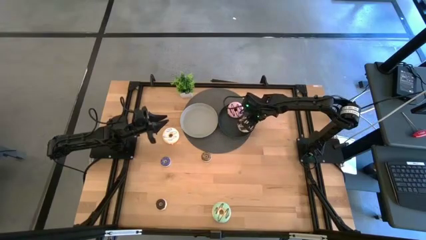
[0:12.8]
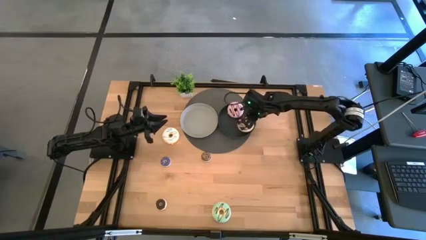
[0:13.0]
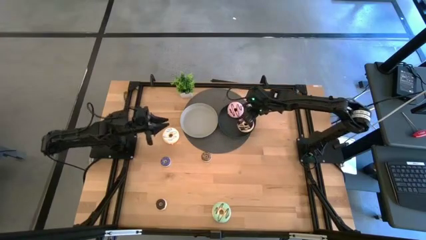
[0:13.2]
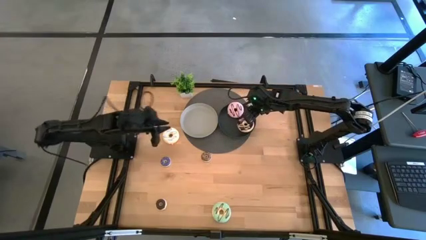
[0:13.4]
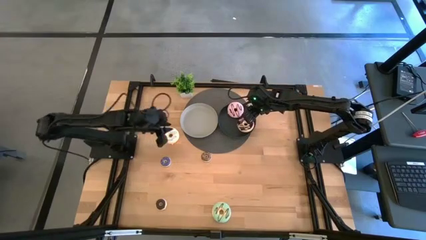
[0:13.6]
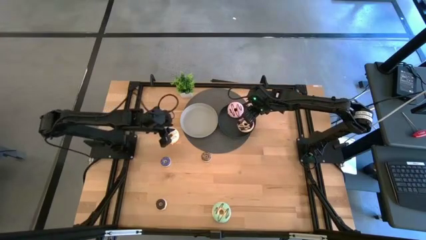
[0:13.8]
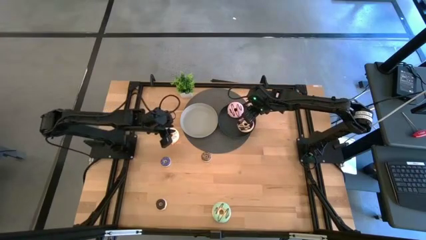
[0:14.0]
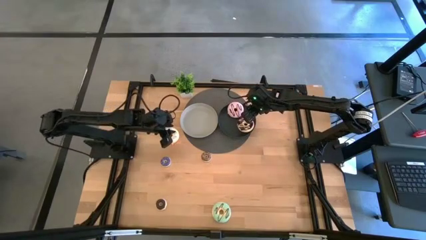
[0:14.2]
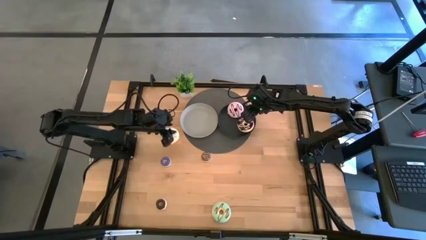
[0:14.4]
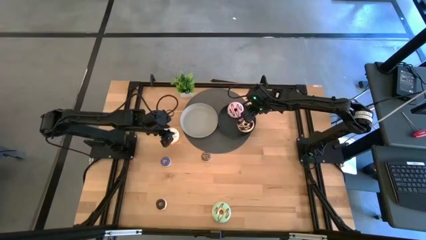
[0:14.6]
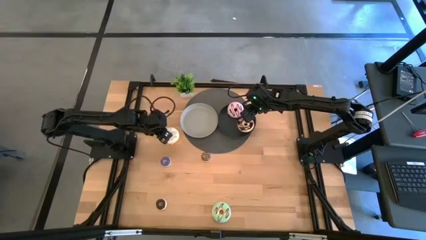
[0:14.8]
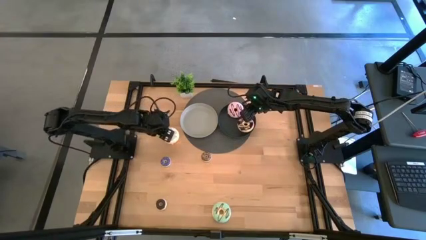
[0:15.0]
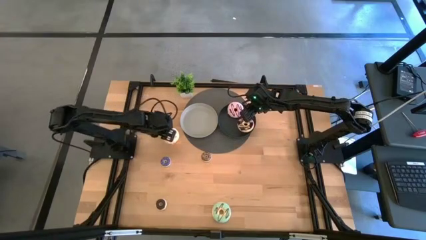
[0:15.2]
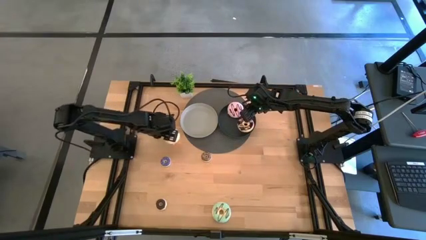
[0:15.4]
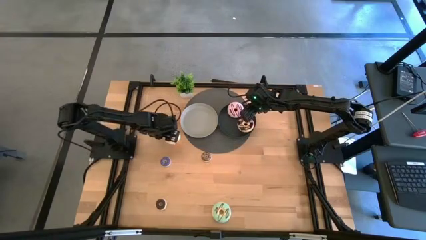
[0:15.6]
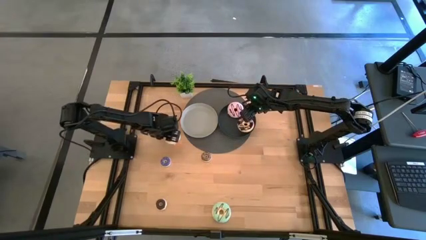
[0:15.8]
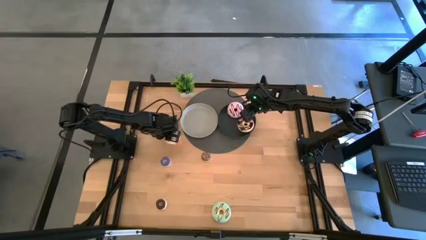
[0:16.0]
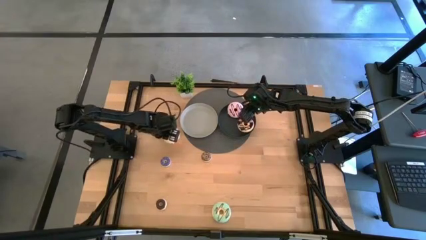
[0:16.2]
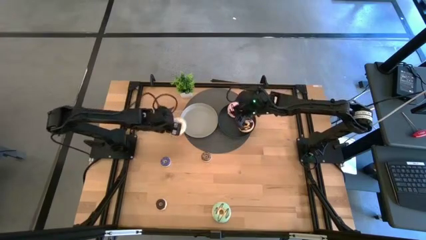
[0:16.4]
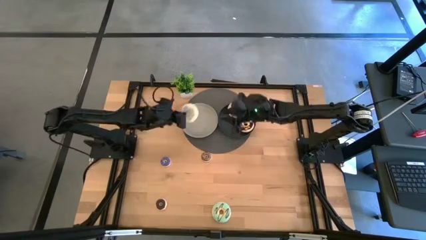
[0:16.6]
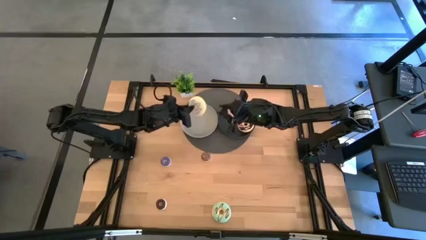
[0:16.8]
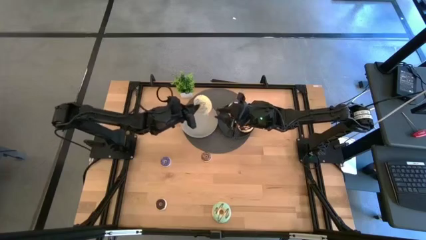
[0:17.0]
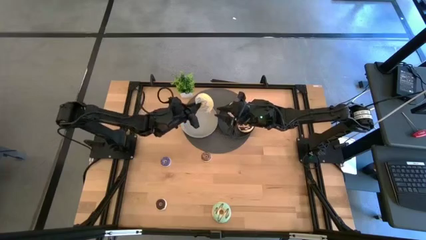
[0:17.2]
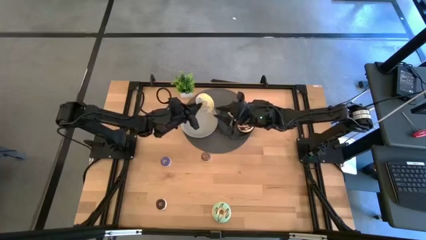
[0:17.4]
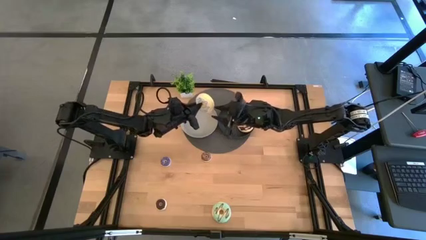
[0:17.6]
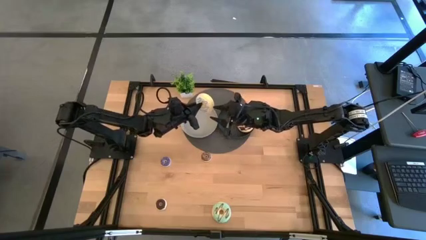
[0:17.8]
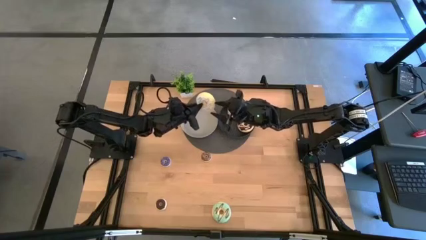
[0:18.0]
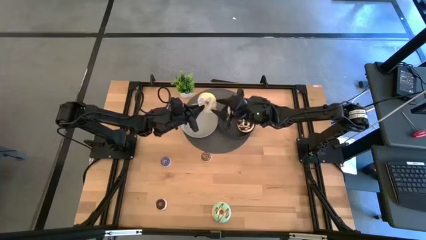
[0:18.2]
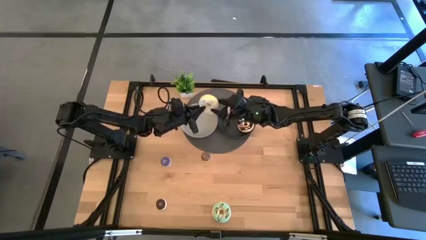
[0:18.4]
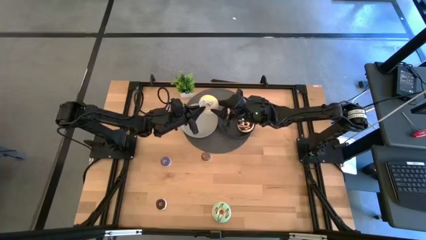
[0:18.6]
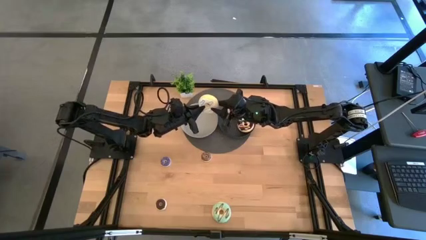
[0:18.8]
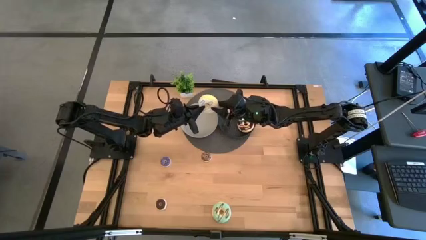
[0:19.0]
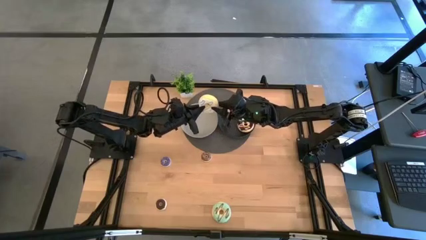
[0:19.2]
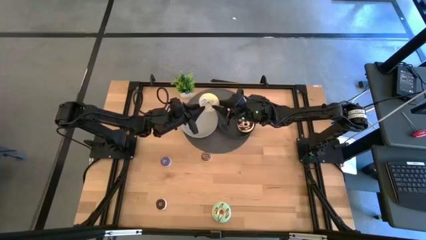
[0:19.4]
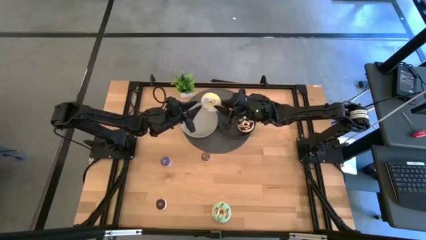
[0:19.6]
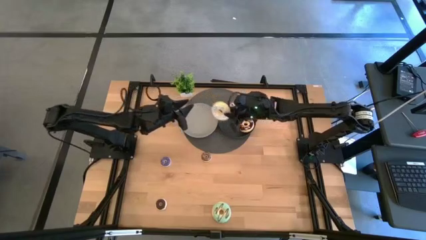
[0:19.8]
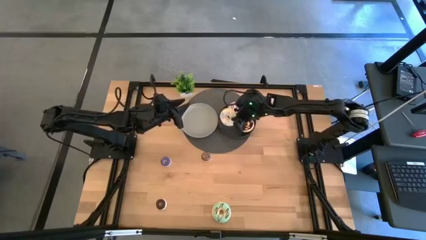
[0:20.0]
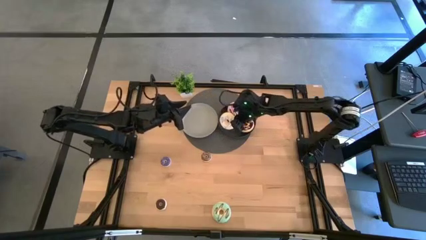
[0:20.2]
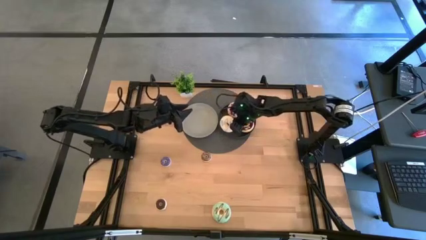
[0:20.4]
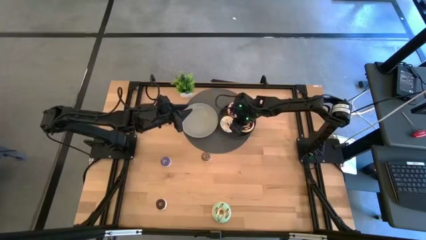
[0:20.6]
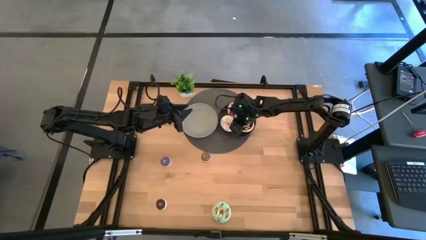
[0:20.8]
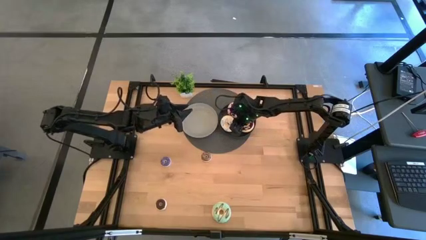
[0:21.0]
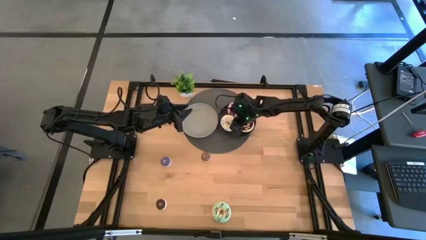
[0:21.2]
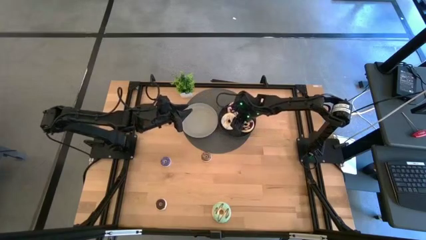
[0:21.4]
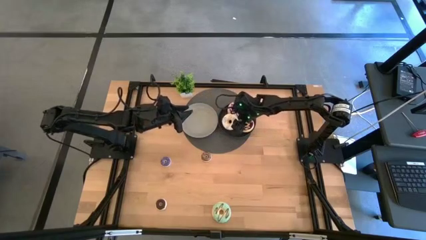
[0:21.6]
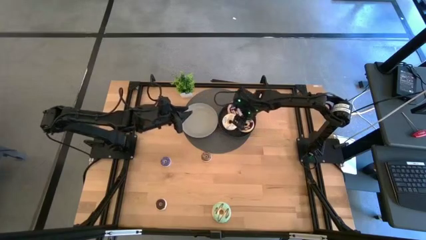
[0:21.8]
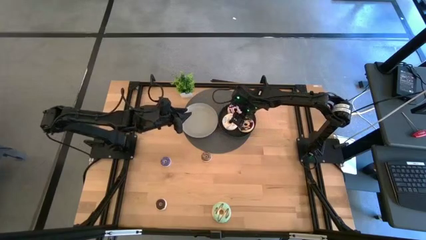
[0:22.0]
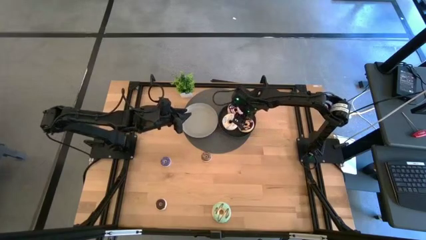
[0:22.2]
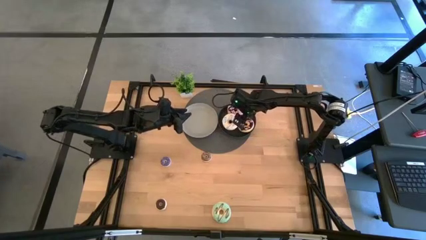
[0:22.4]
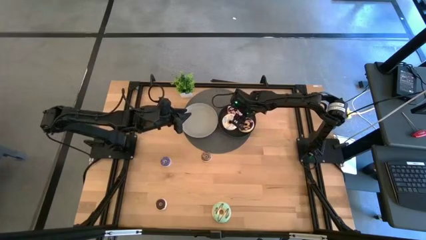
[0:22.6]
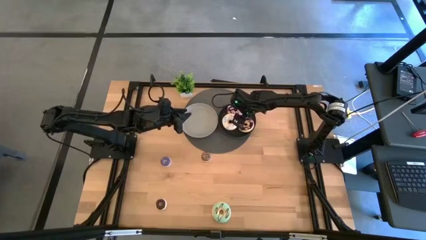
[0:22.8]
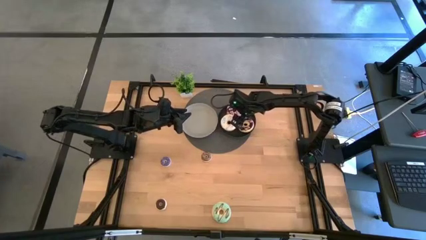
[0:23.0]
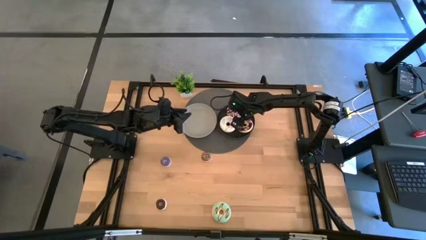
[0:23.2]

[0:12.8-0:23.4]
Task: Pick & Place donuts
Put the big white donut on the black plate

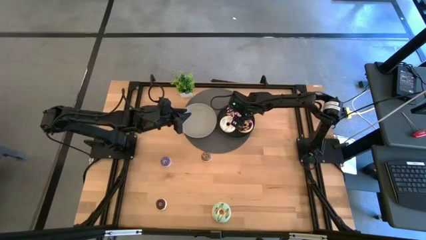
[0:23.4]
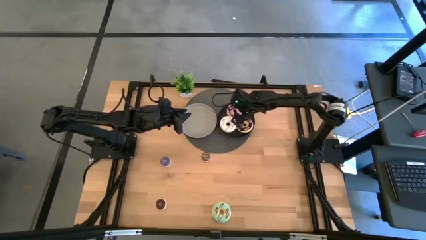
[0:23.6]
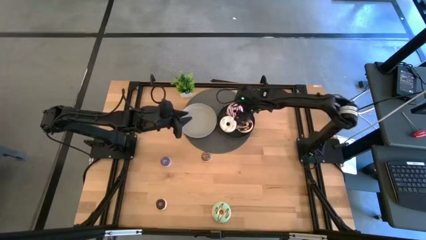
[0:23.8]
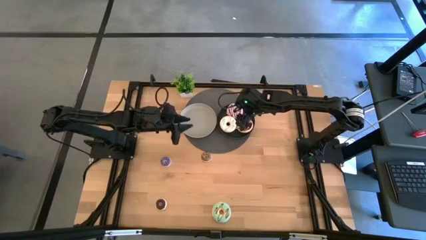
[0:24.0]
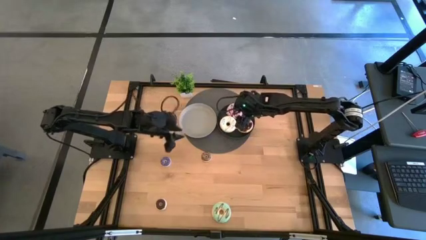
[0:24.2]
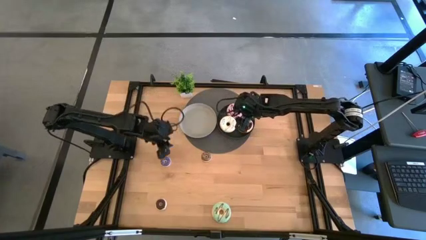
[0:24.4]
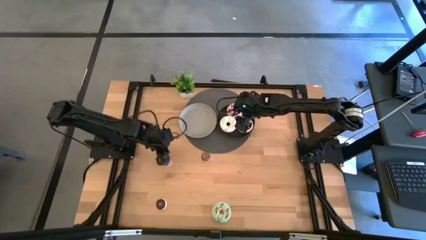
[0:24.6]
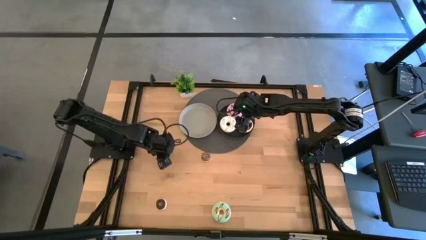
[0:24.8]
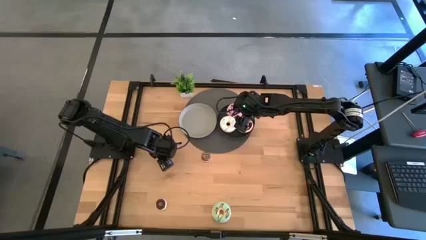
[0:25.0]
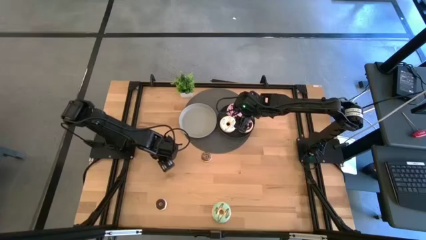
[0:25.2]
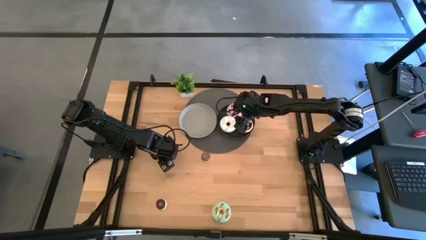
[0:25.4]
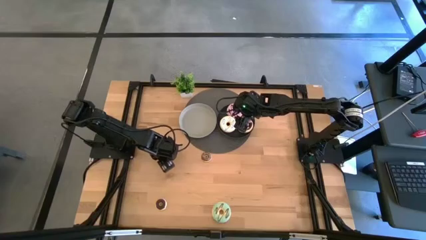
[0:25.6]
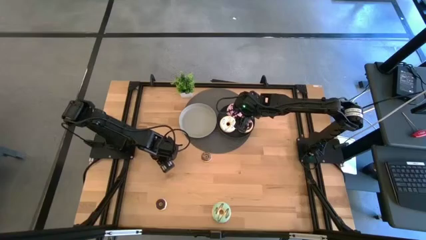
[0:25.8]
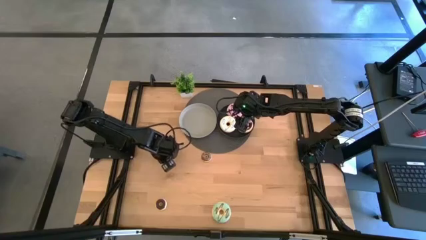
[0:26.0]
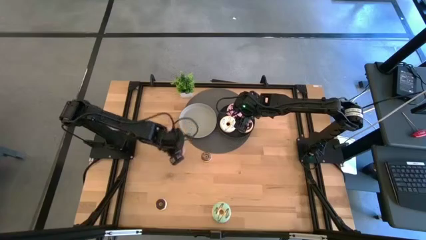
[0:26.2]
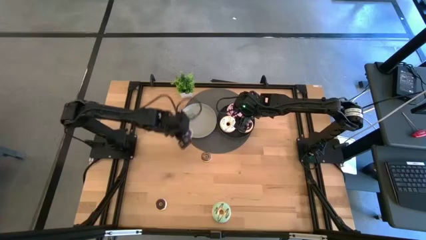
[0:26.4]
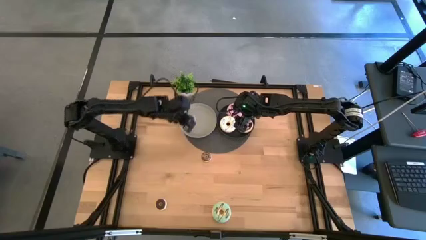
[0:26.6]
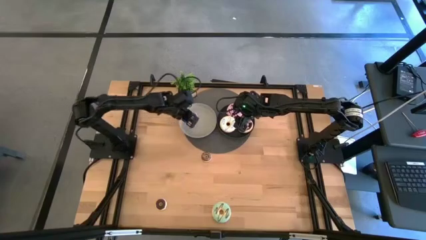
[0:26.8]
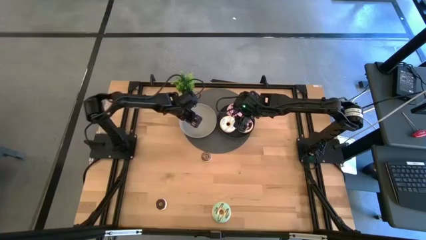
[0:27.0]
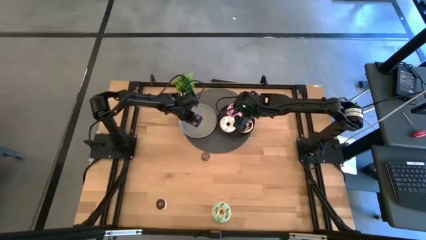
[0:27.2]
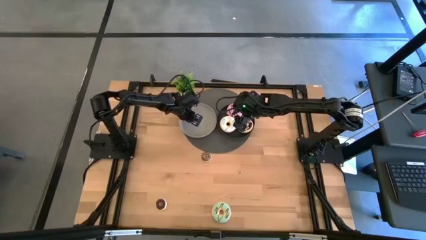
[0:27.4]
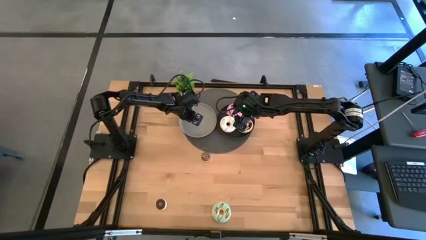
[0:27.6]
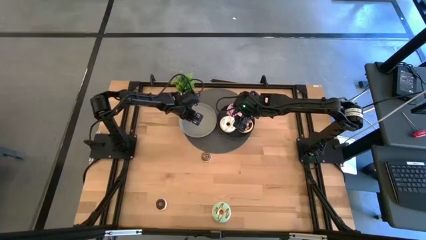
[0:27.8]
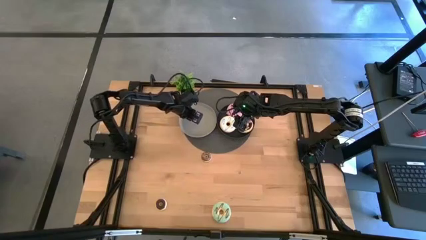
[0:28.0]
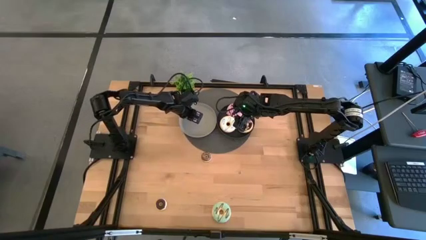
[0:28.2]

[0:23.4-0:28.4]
Put the small purple donut on the white plate
